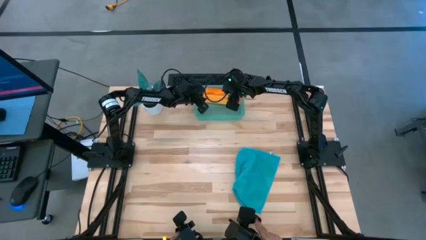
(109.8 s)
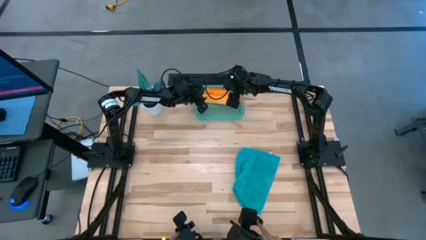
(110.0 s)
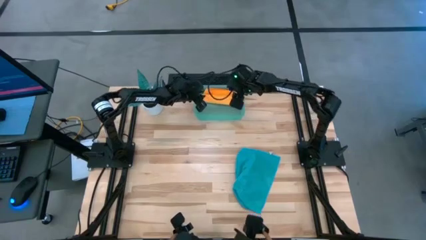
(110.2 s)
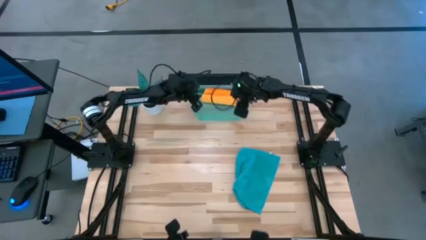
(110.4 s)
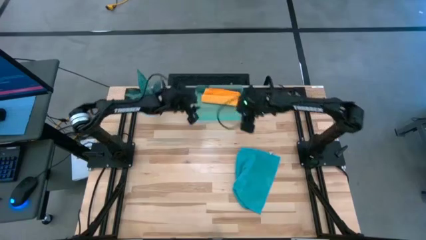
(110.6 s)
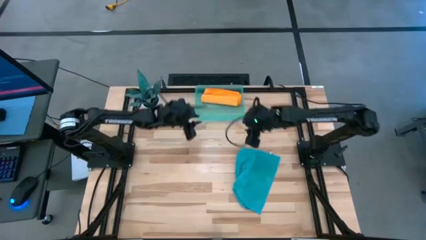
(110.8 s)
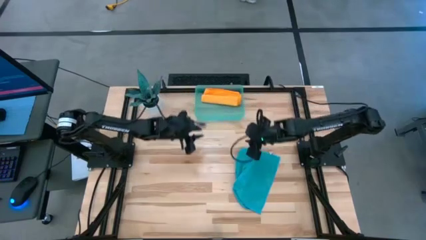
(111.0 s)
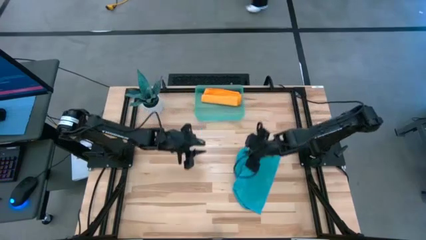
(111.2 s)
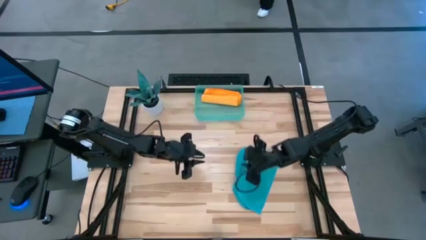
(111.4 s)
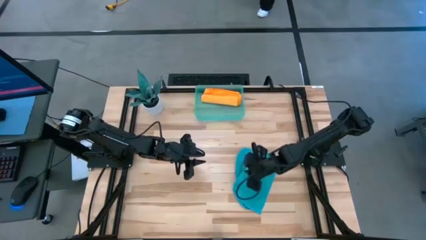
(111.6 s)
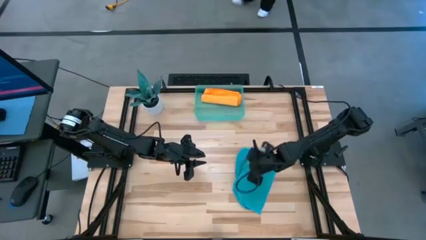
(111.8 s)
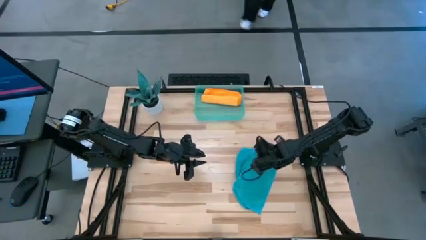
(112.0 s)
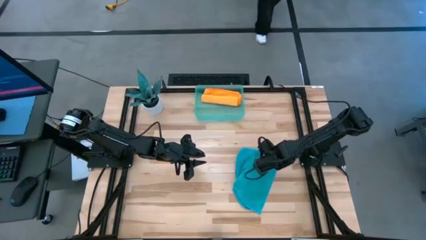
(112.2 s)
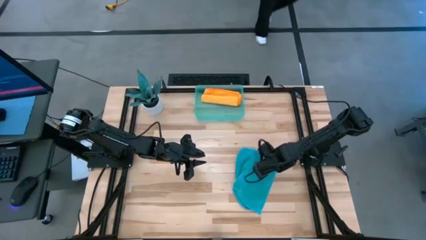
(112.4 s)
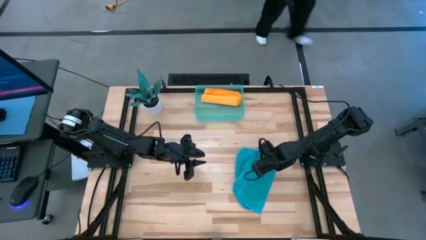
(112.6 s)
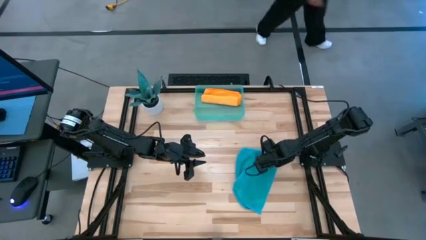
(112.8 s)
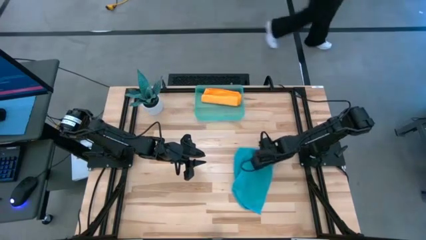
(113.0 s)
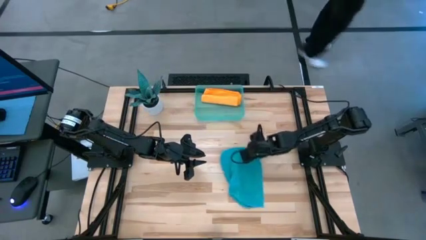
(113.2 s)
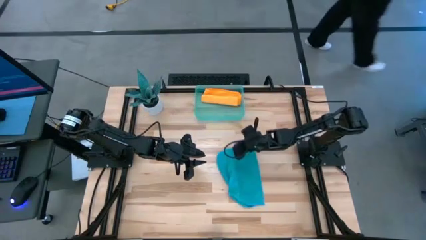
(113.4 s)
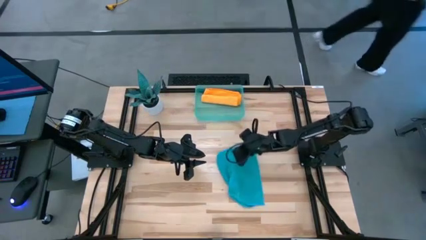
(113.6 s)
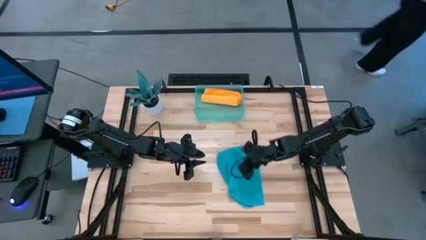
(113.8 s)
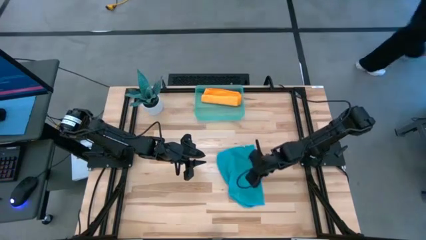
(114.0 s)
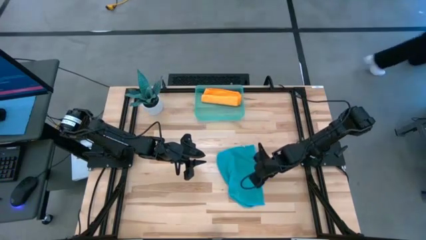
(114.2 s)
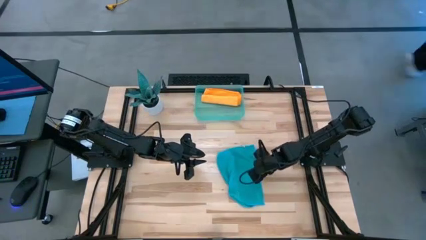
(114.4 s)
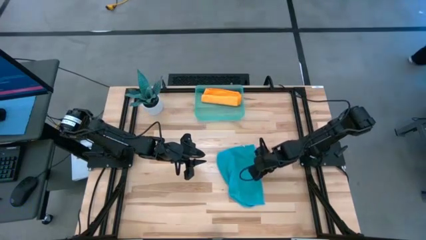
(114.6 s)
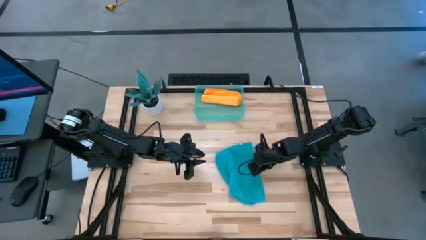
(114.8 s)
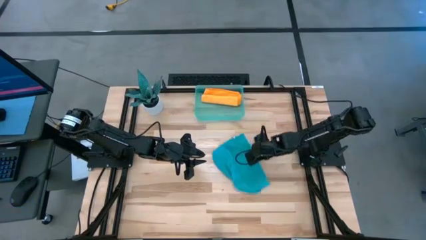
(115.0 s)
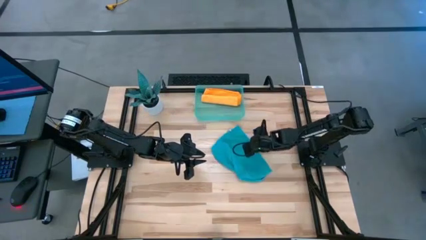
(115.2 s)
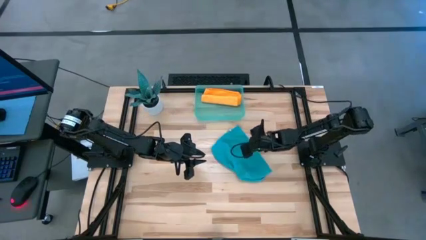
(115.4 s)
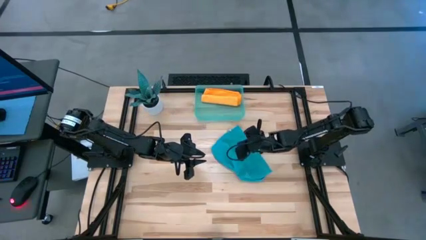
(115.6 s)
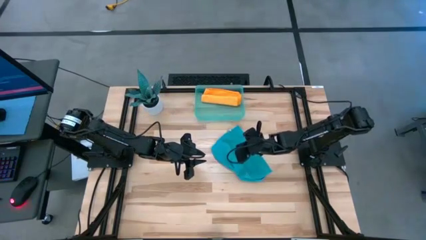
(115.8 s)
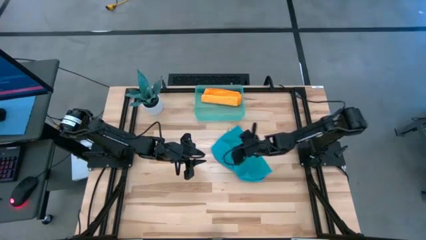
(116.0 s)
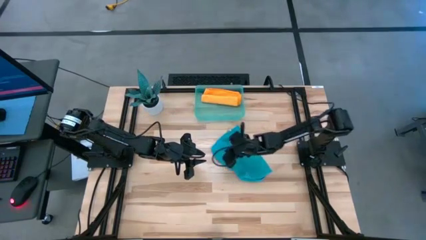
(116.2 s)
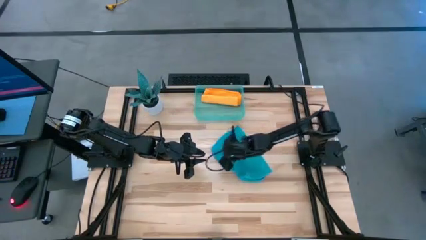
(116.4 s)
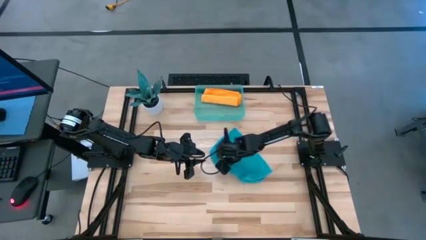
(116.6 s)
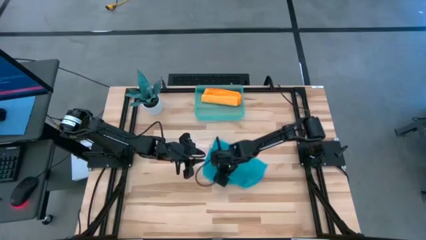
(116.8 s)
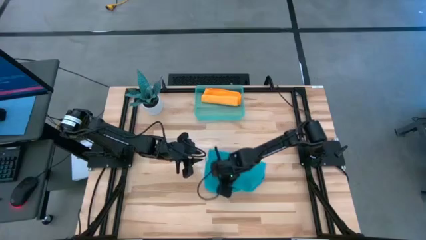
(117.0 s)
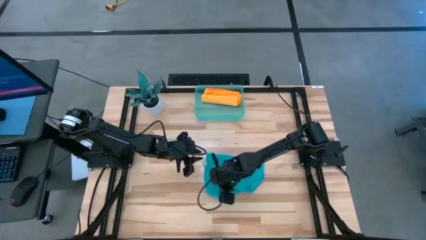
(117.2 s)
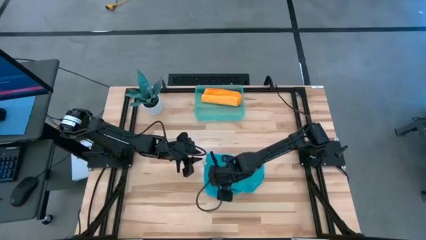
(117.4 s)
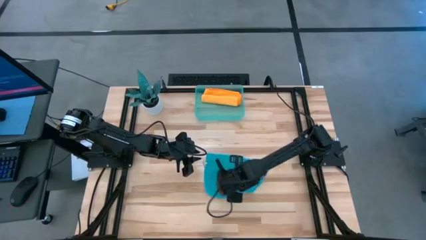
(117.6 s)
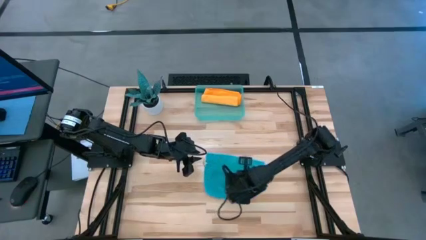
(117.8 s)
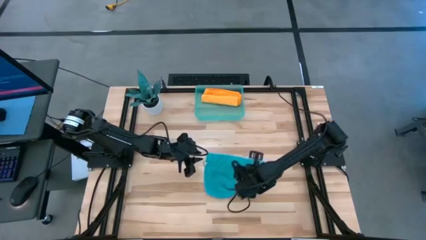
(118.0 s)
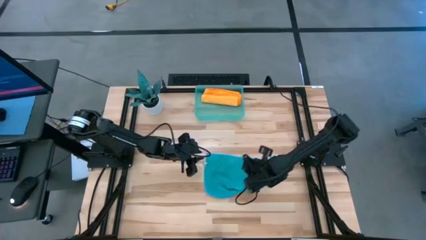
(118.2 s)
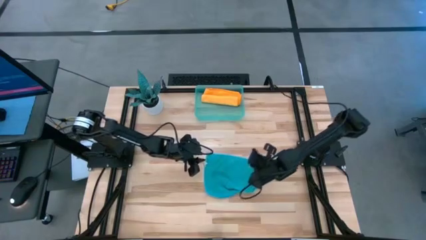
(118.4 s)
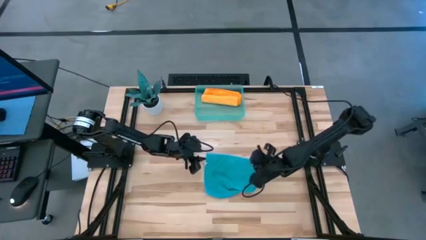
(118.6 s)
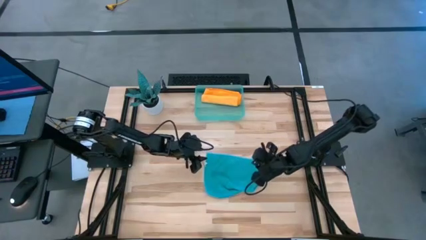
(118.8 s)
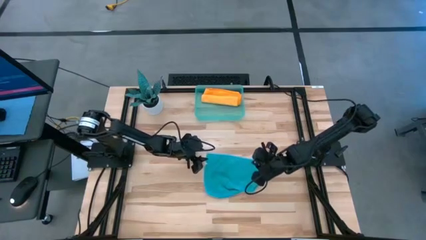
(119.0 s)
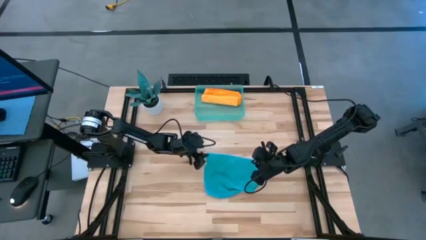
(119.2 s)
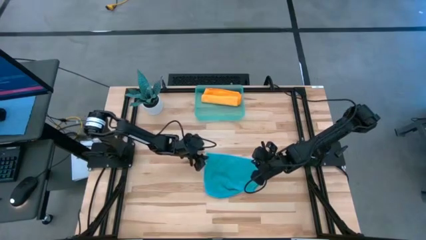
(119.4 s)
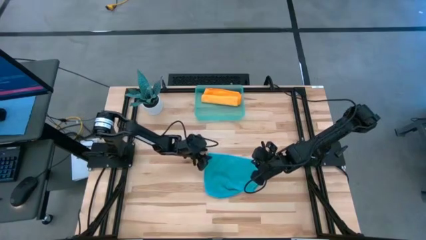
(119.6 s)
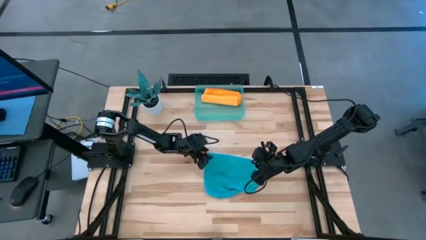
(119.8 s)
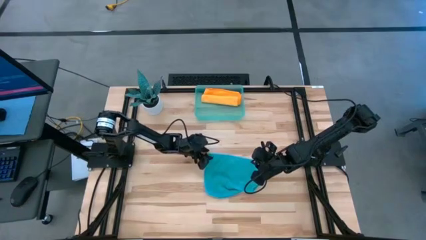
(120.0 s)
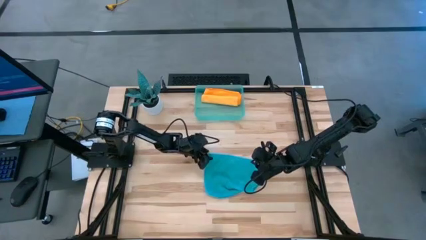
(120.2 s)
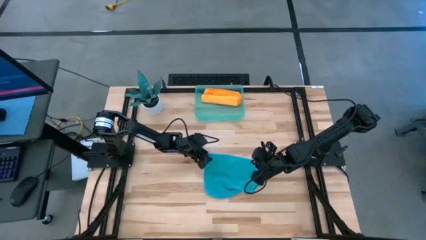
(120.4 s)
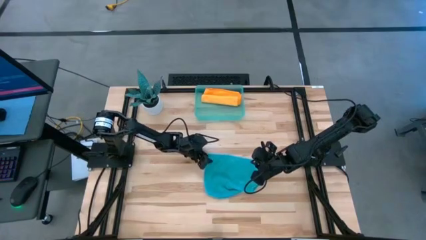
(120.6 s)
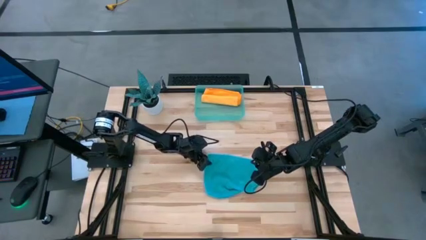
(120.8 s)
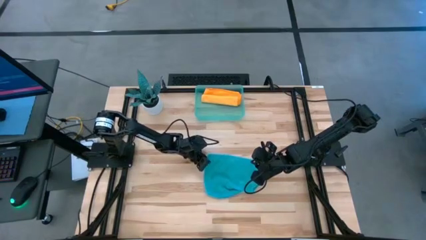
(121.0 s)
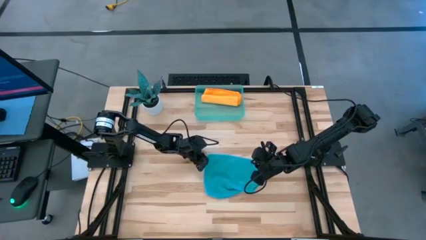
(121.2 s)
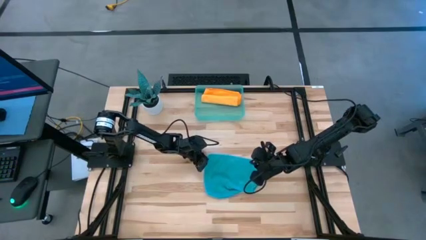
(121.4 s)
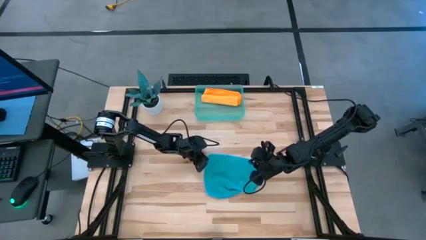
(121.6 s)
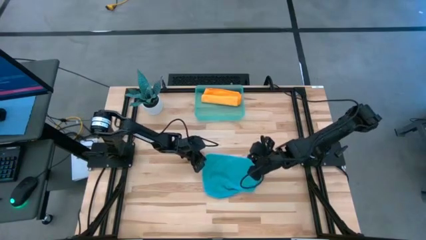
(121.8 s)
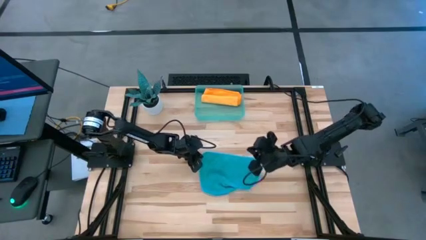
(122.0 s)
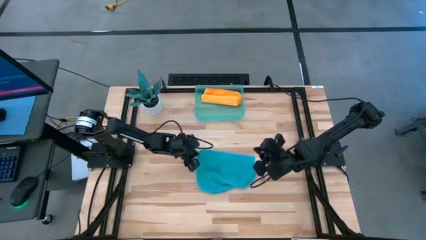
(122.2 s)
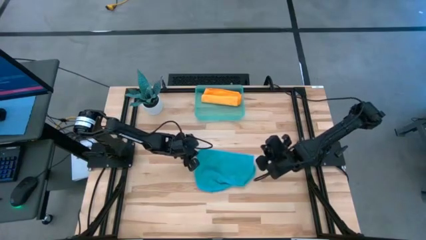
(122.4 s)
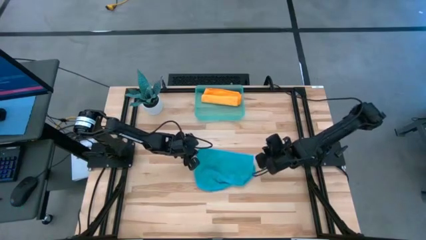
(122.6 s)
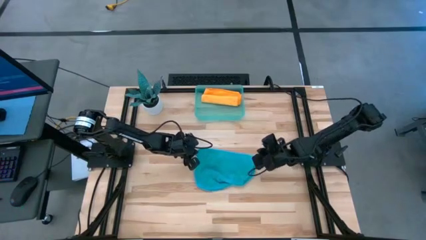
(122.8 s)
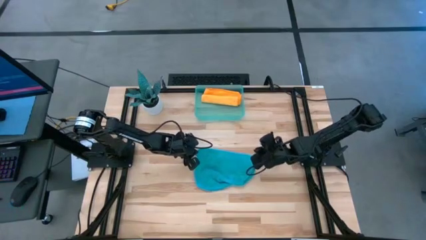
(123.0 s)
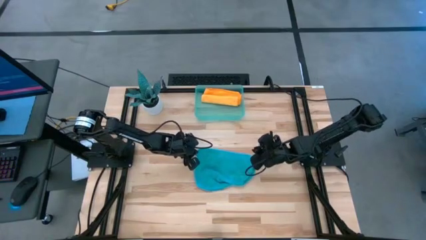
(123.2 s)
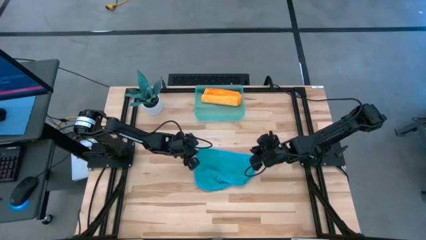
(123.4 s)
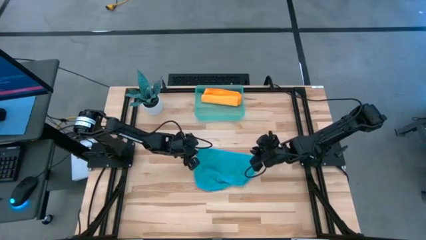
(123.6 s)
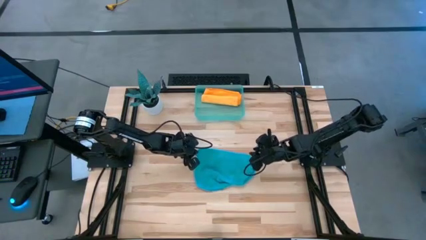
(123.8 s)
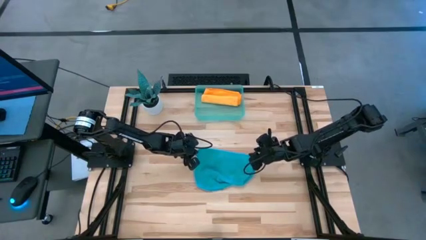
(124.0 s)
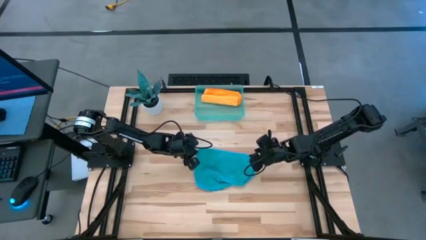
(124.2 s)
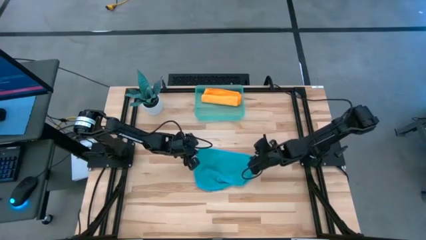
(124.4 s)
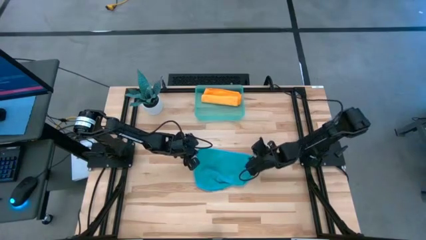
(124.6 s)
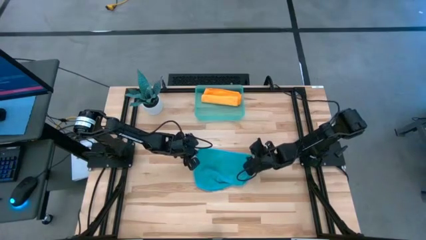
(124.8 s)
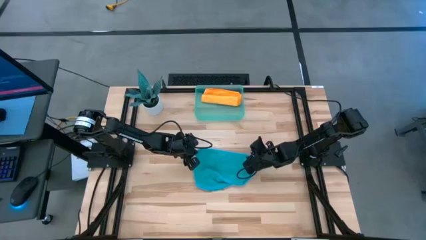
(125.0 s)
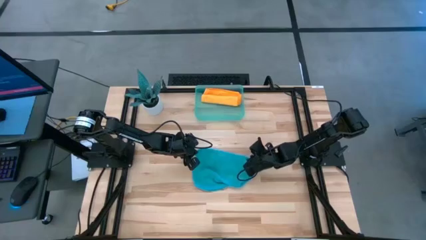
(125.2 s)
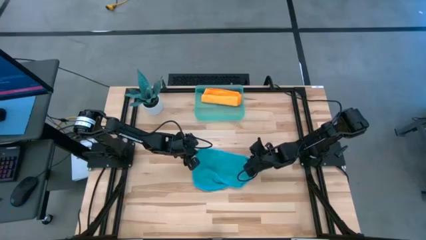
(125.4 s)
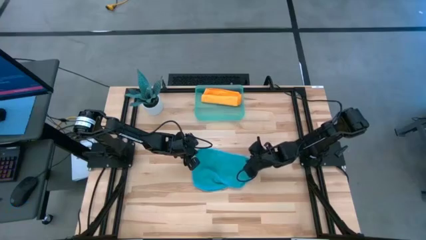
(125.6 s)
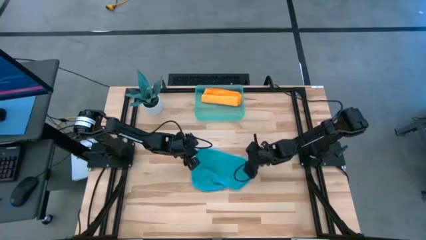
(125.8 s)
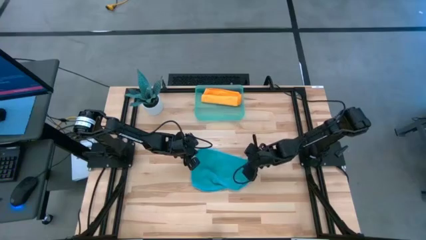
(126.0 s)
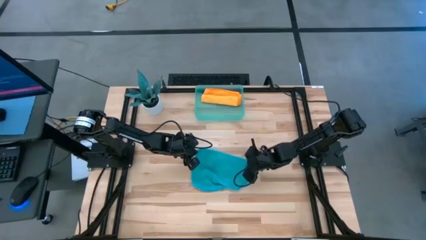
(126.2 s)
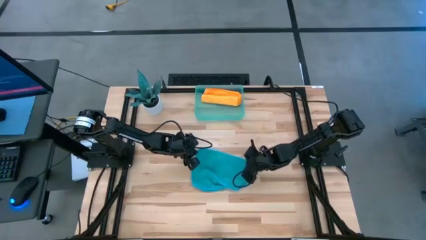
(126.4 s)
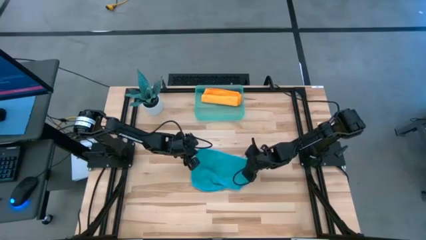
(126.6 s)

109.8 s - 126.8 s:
Task: Roll microfiber towels into tight, uniform cylinder then place into a basket
Roll the blue microfiber cloth
